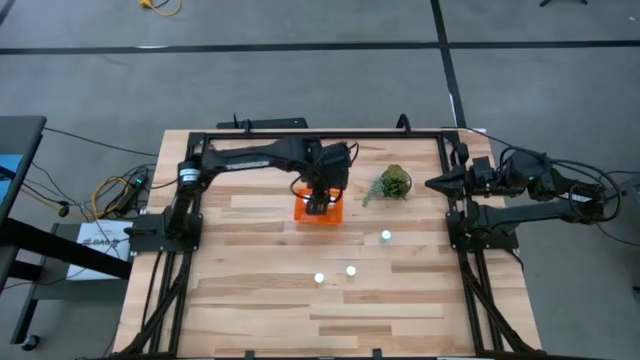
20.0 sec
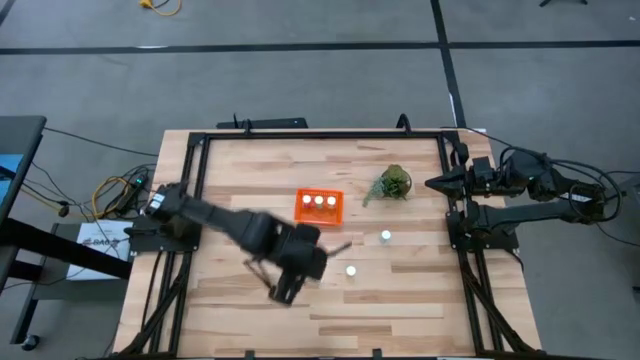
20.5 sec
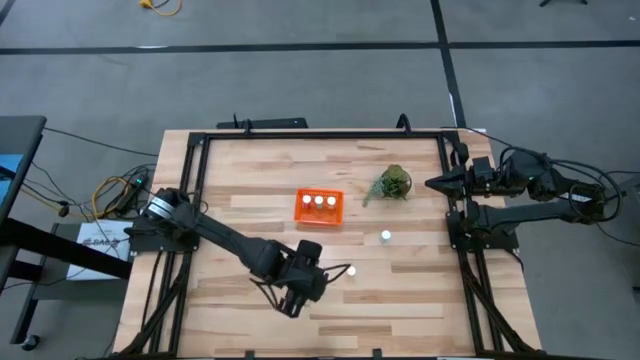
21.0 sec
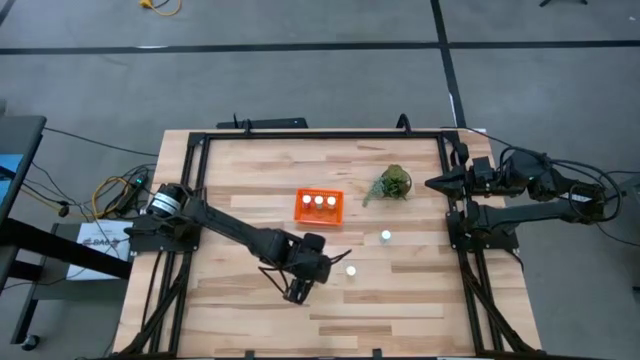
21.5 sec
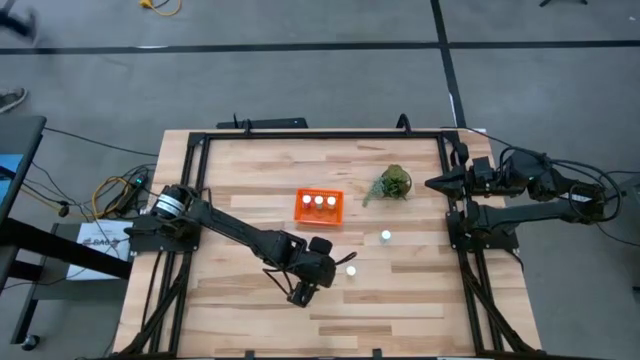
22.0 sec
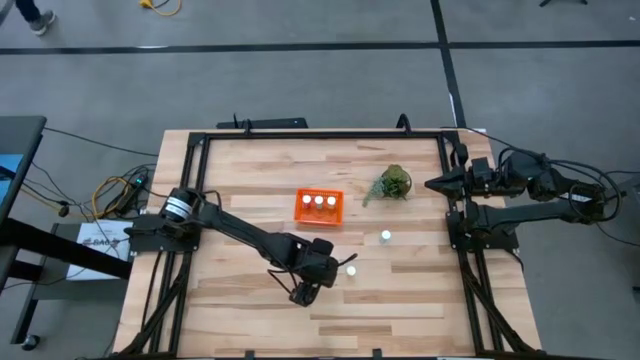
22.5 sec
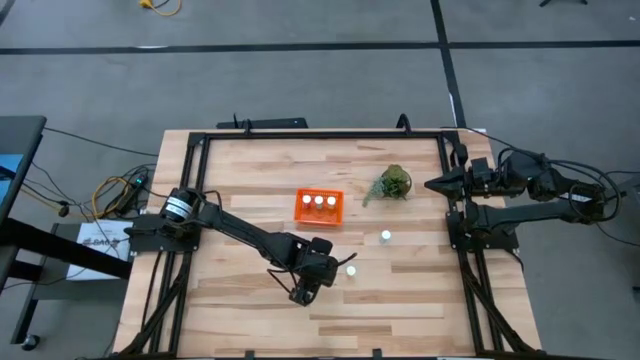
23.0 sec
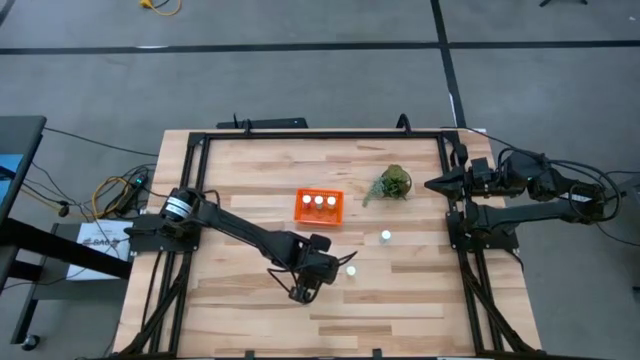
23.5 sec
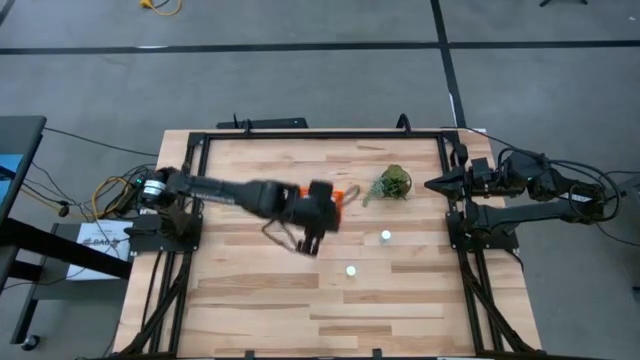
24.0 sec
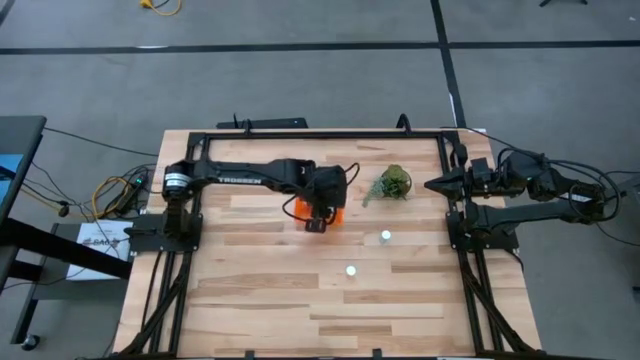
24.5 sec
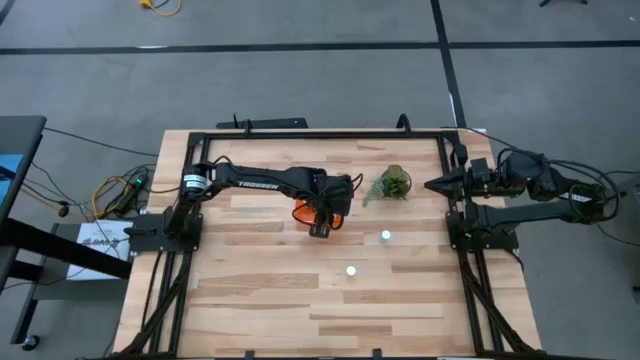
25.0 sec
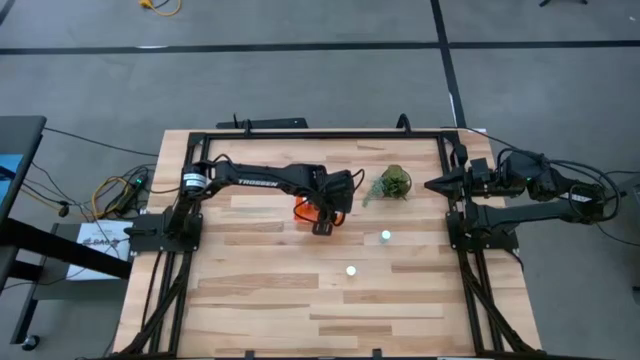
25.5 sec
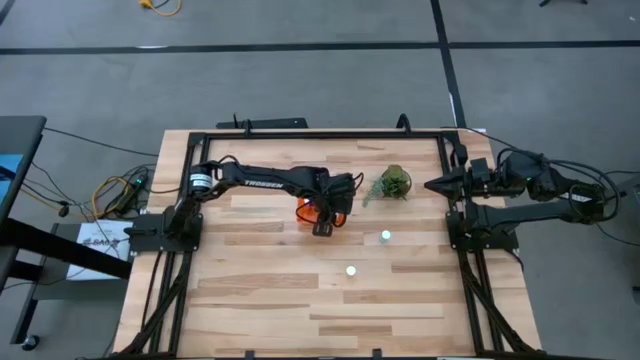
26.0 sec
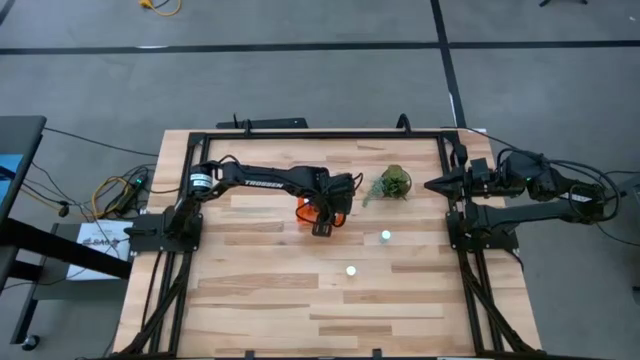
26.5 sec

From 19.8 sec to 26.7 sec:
Task: Pick and place pill bottles into a basket
Put the left yellow pill bottle into the orange bin

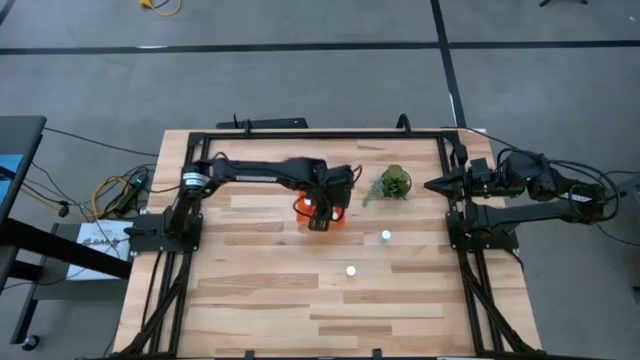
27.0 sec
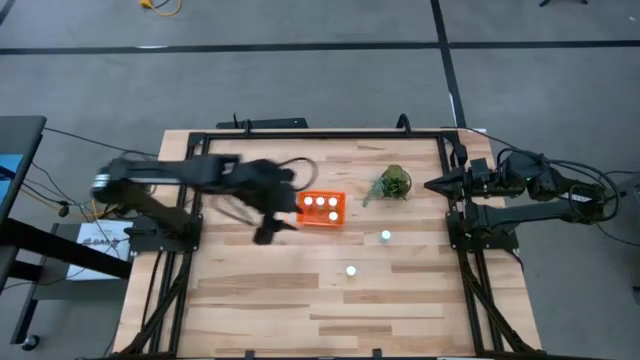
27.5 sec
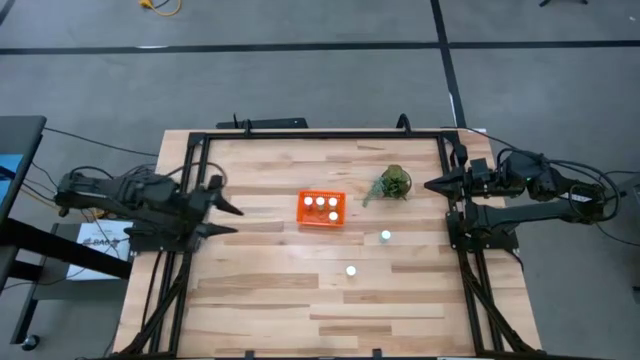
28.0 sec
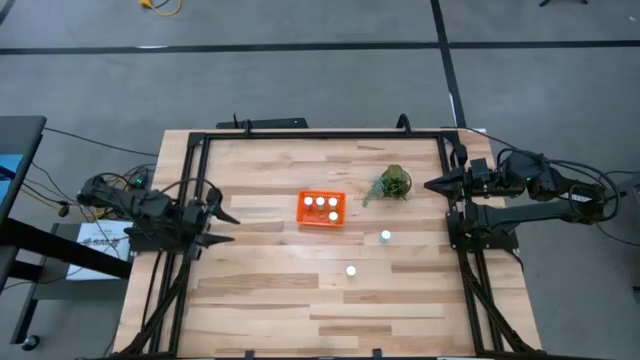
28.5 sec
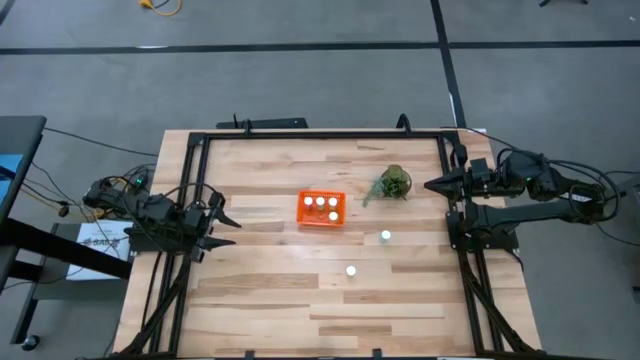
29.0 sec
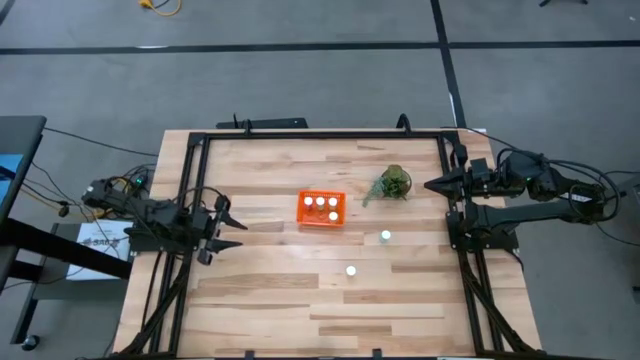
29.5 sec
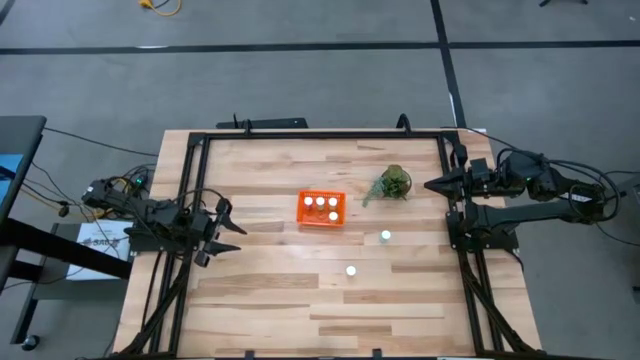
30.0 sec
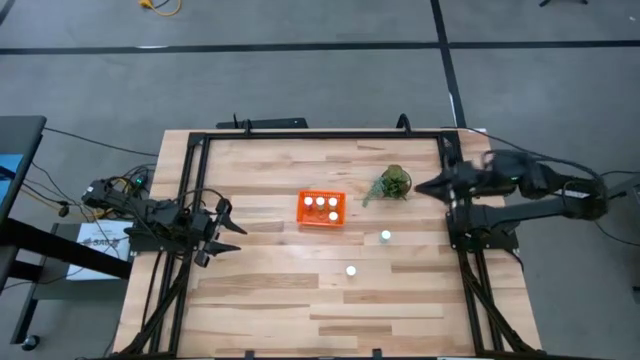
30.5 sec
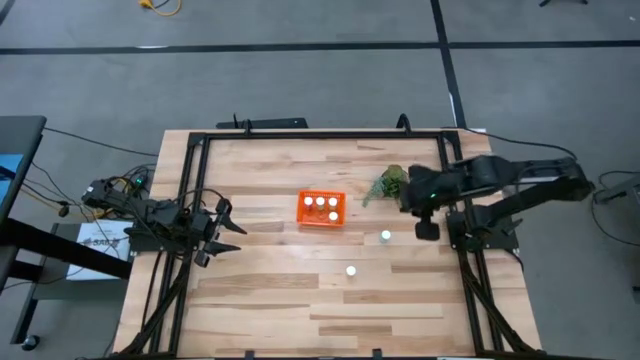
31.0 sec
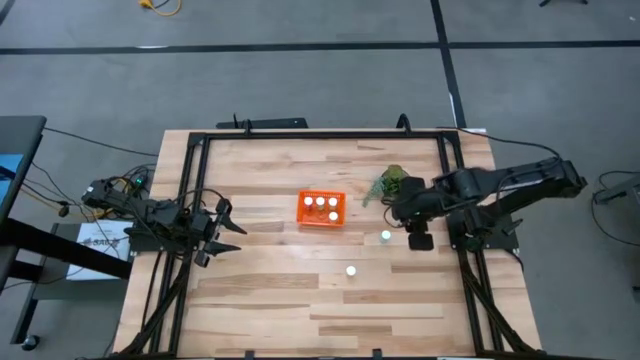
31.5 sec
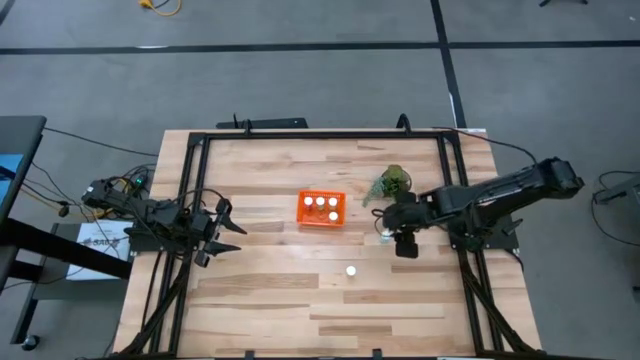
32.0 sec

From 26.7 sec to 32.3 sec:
Put the blue pill bottle into the orange bin

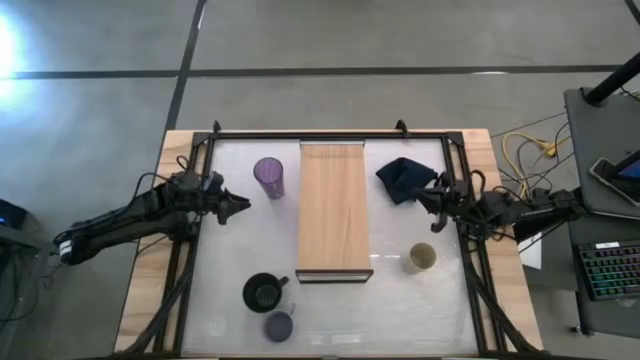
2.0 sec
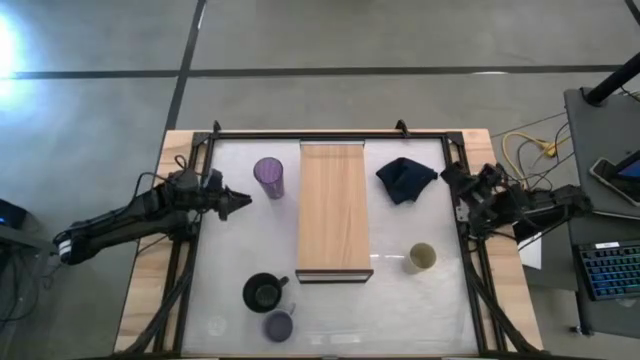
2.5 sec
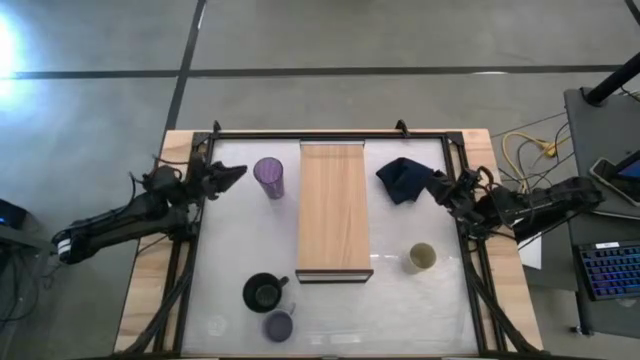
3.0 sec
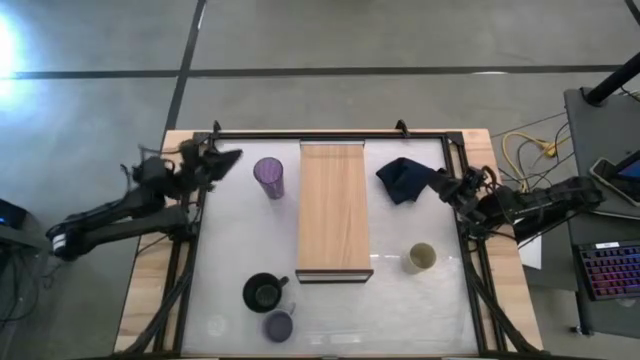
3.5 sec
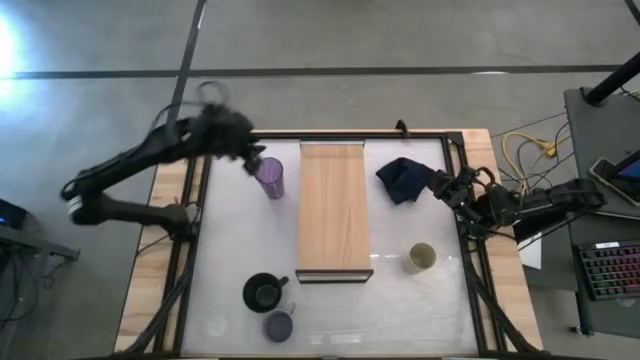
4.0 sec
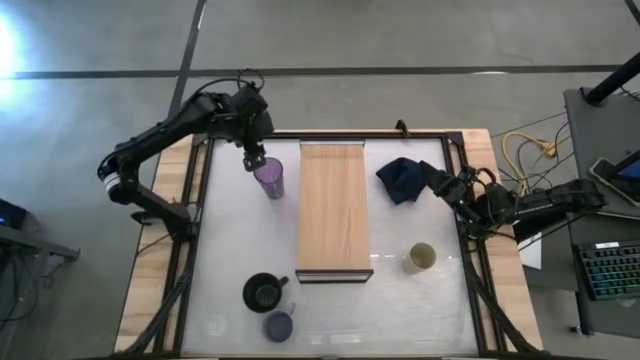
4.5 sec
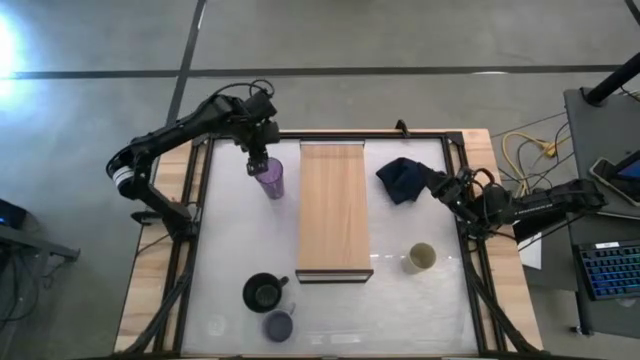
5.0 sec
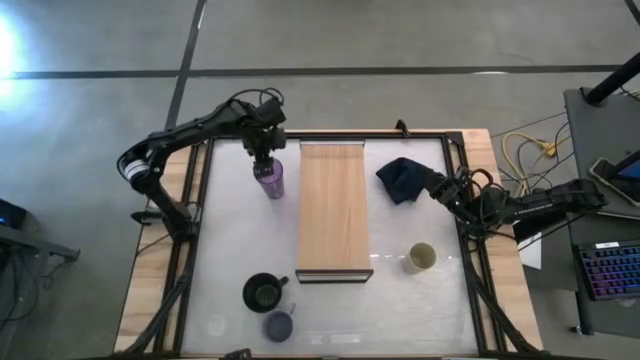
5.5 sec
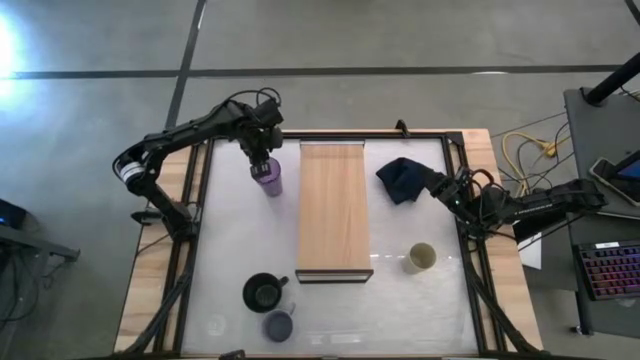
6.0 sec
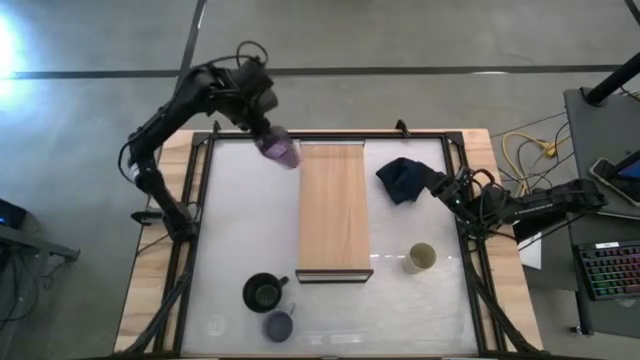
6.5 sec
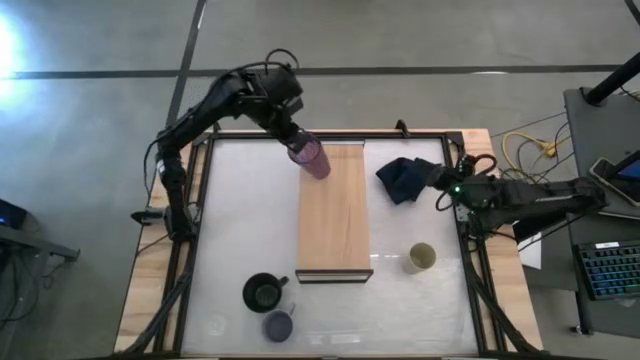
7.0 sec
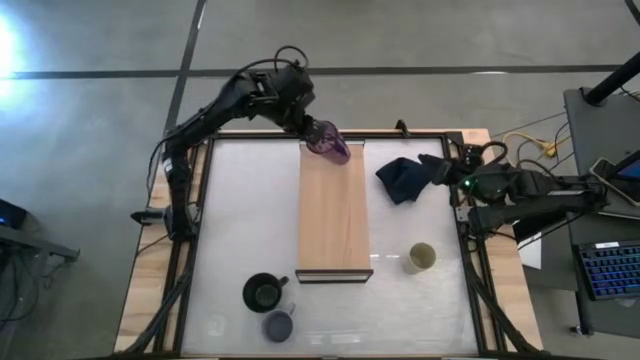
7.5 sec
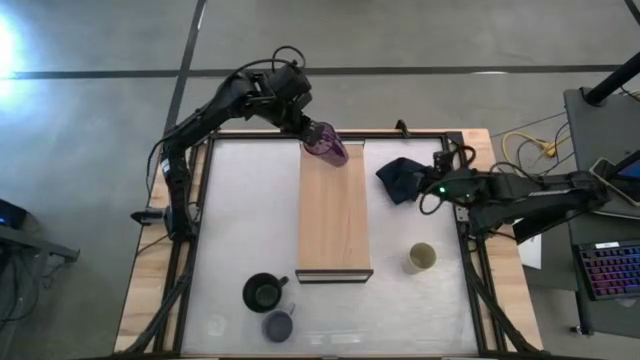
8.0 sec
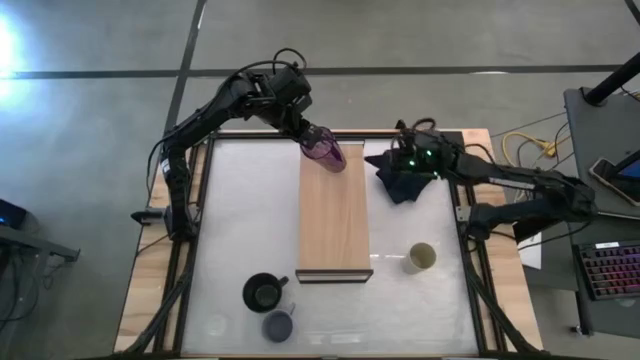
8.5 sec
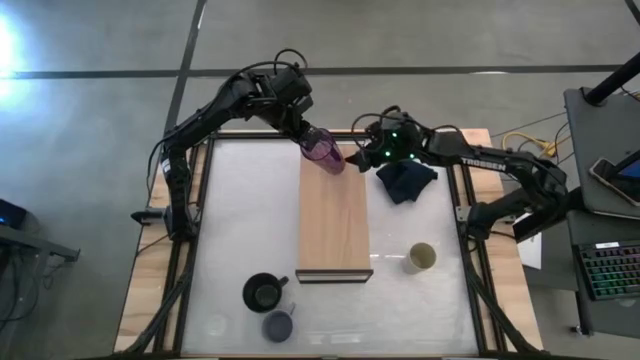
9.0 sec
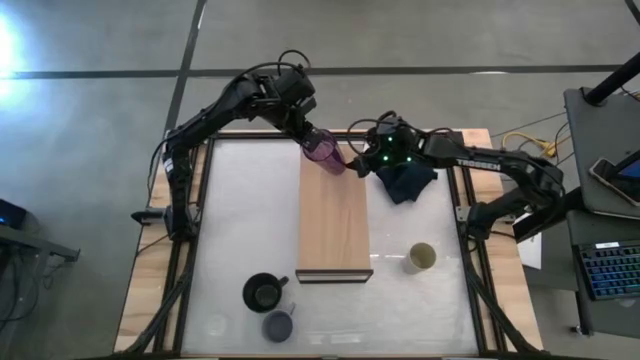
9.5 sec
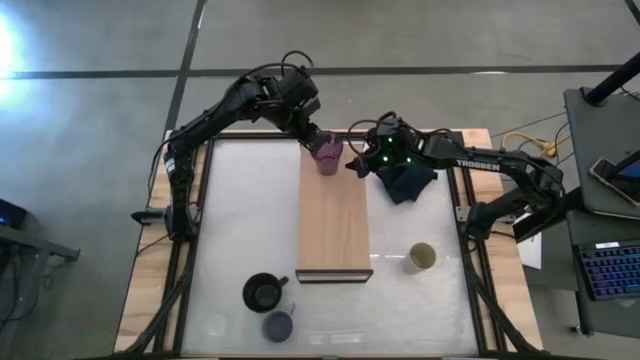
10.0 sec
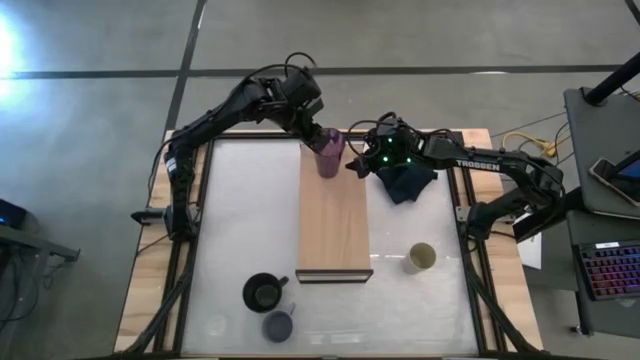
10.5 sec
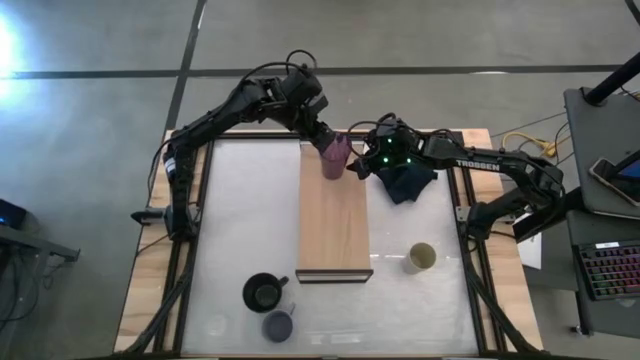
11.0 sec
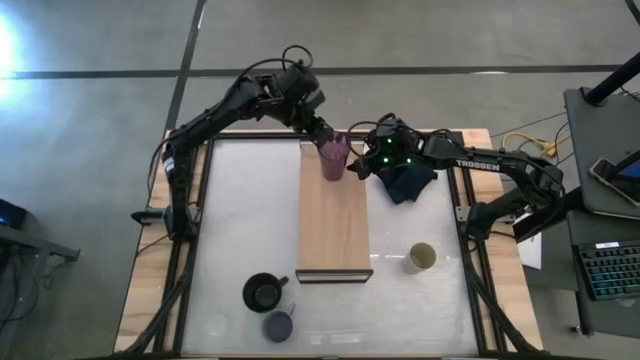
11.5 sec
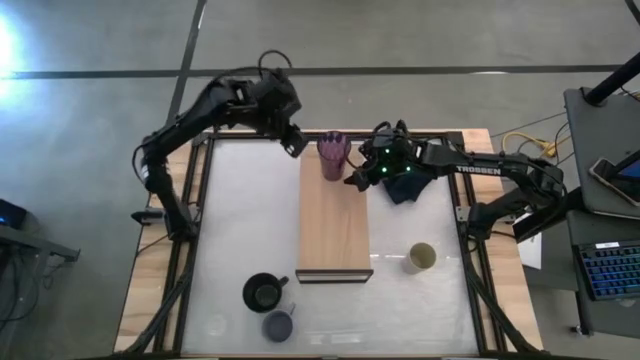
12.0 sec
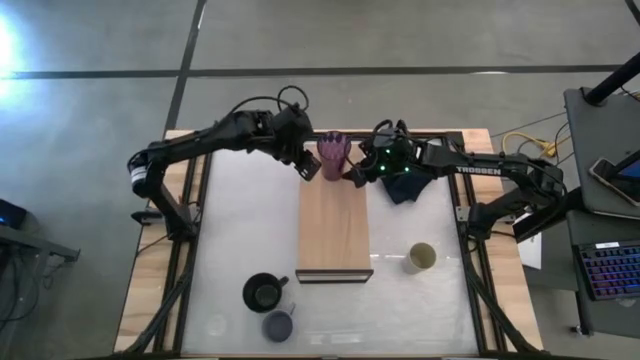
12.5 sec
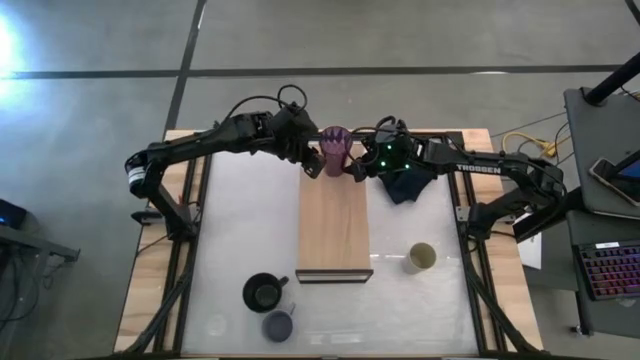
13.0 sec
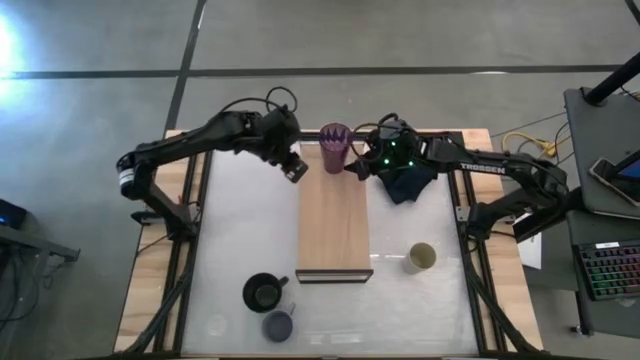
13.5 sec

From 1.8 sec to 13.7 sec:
Task: Stack small to large cups/mugs on shelf
Put the violet transparent cup on the shelf
